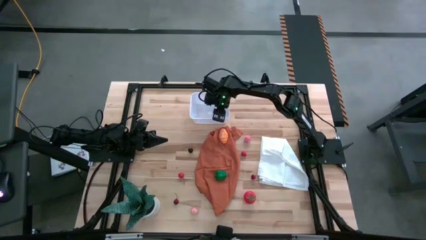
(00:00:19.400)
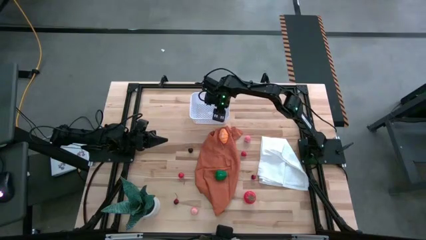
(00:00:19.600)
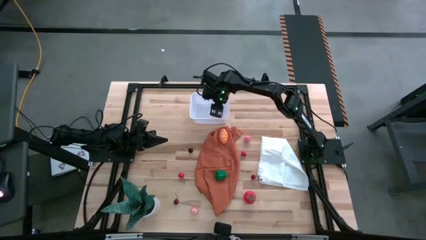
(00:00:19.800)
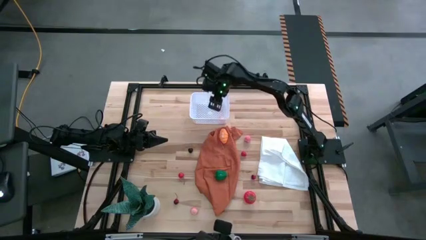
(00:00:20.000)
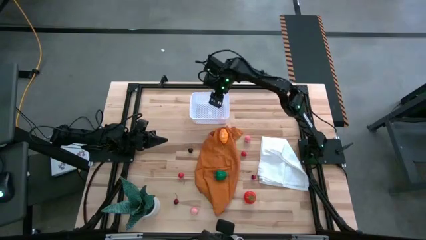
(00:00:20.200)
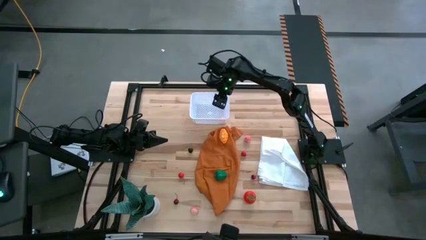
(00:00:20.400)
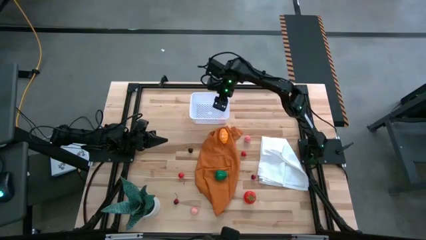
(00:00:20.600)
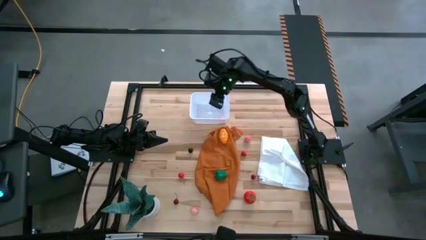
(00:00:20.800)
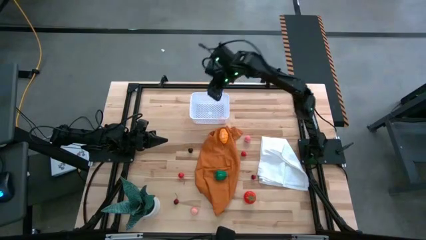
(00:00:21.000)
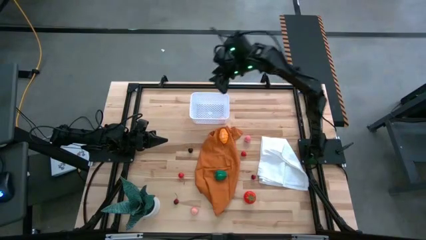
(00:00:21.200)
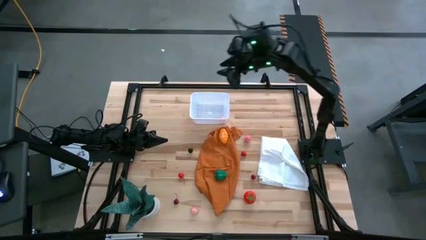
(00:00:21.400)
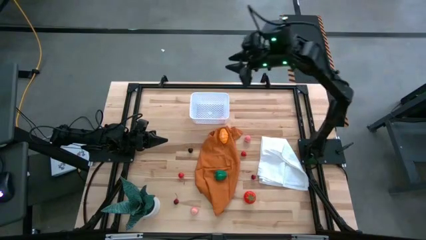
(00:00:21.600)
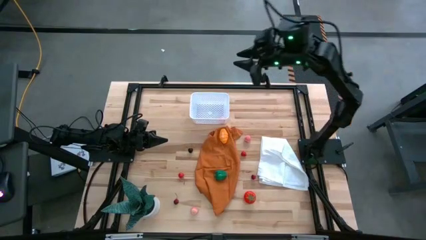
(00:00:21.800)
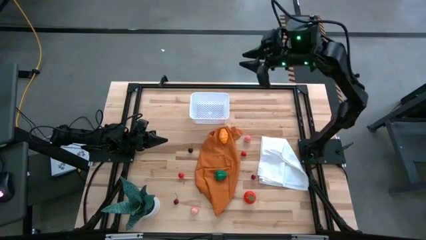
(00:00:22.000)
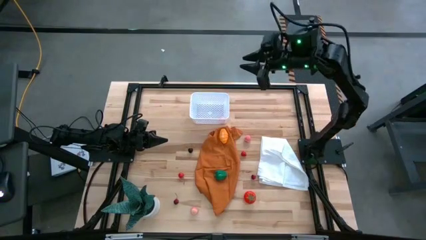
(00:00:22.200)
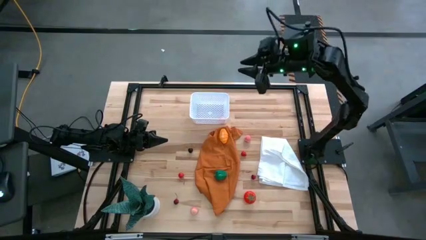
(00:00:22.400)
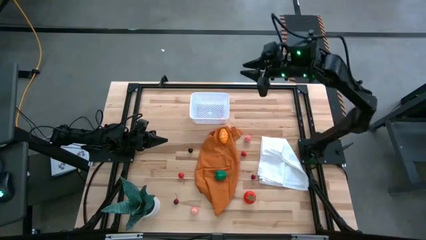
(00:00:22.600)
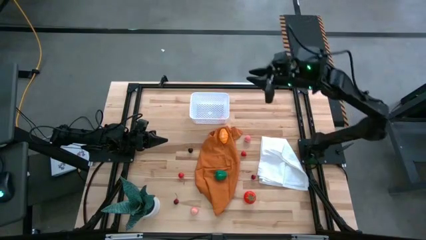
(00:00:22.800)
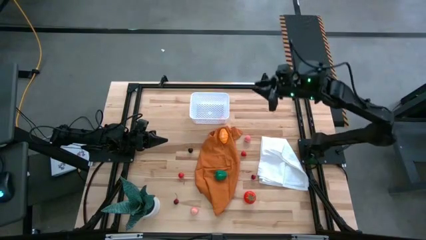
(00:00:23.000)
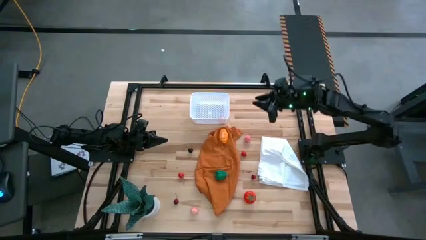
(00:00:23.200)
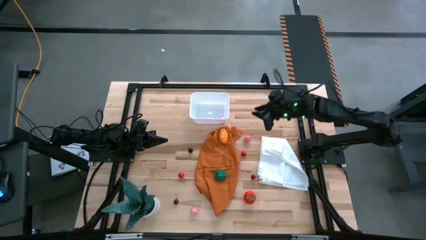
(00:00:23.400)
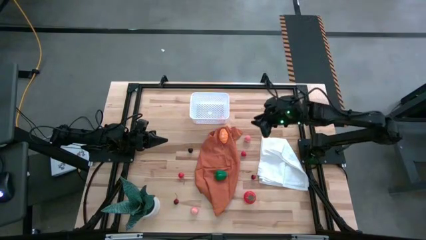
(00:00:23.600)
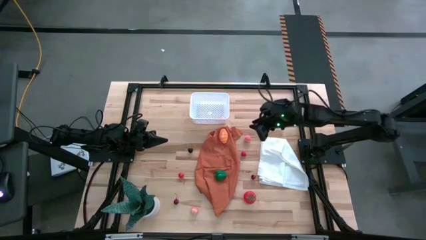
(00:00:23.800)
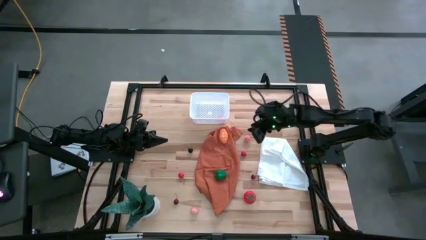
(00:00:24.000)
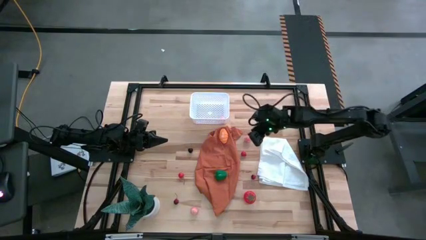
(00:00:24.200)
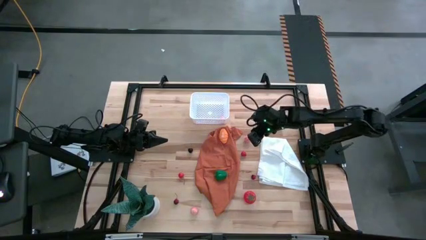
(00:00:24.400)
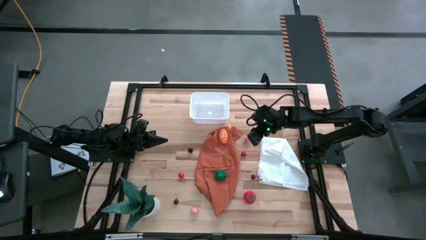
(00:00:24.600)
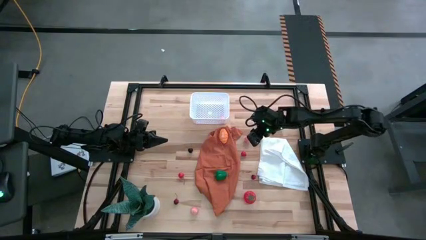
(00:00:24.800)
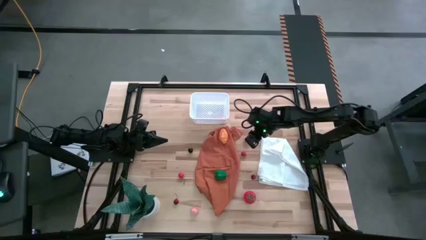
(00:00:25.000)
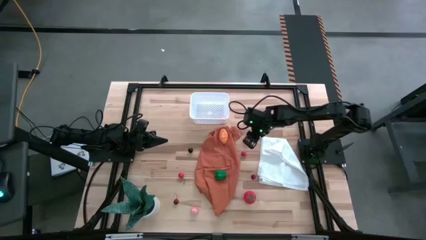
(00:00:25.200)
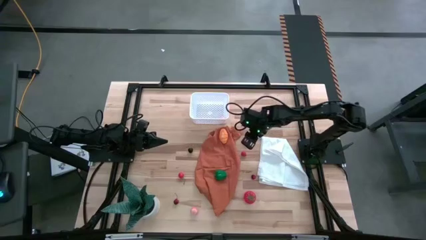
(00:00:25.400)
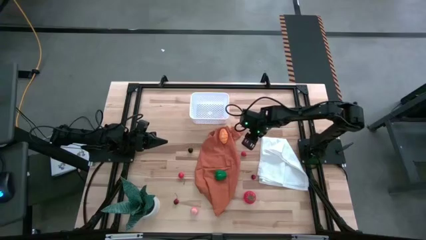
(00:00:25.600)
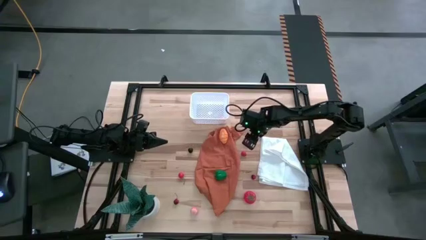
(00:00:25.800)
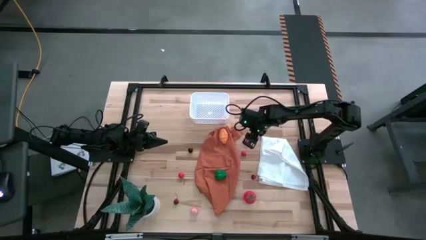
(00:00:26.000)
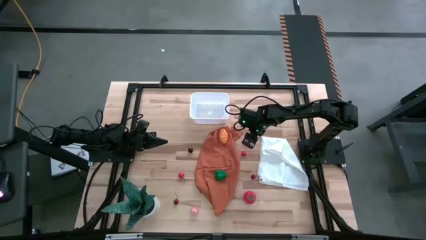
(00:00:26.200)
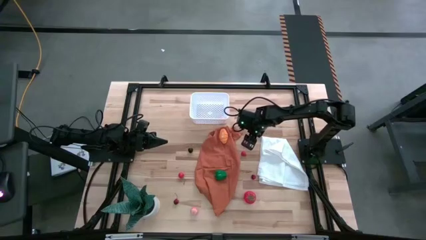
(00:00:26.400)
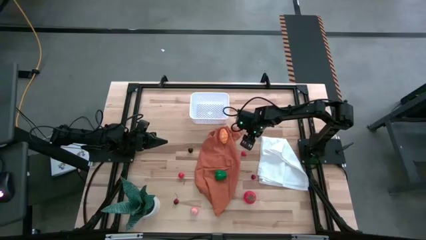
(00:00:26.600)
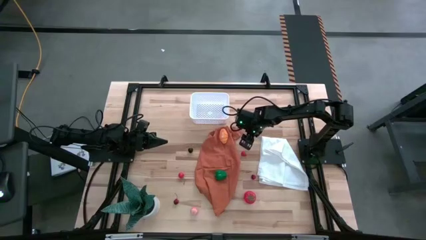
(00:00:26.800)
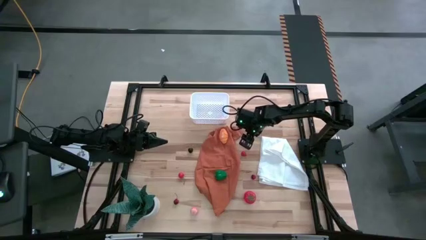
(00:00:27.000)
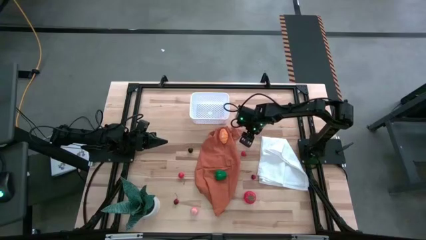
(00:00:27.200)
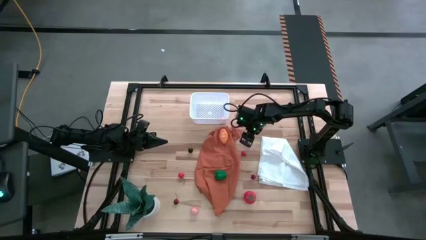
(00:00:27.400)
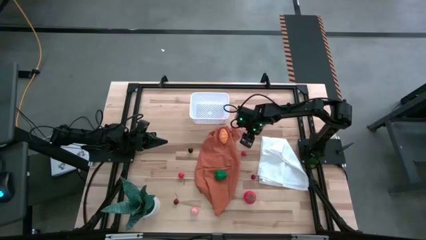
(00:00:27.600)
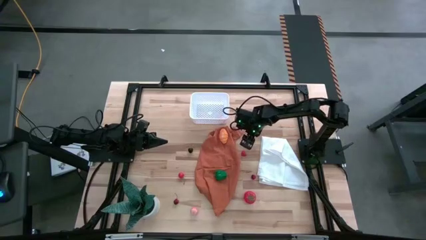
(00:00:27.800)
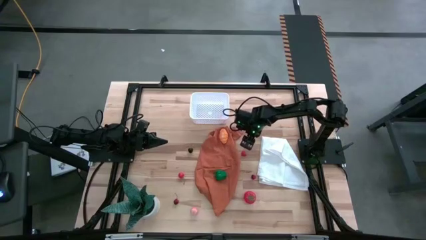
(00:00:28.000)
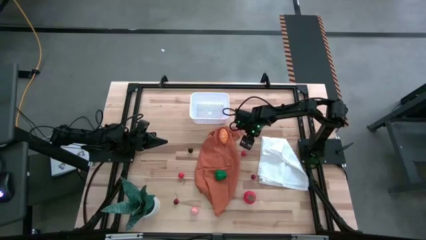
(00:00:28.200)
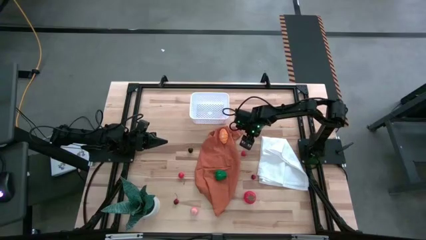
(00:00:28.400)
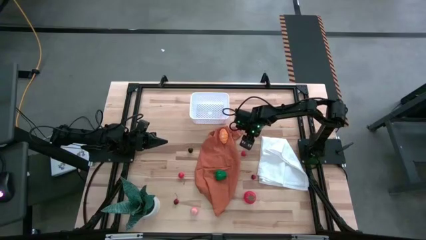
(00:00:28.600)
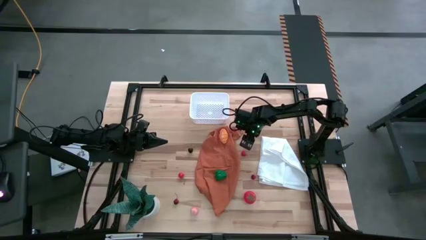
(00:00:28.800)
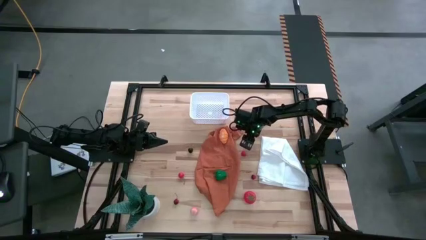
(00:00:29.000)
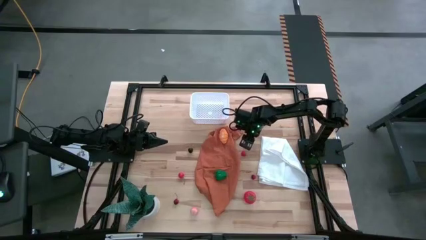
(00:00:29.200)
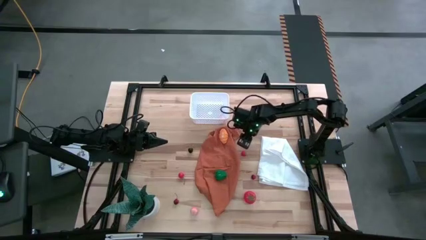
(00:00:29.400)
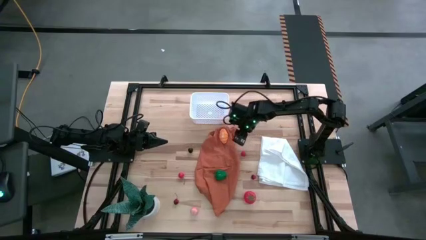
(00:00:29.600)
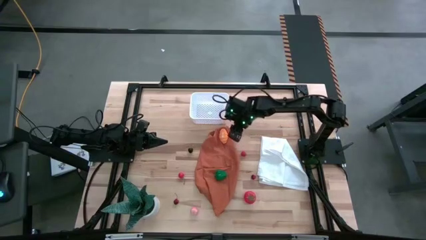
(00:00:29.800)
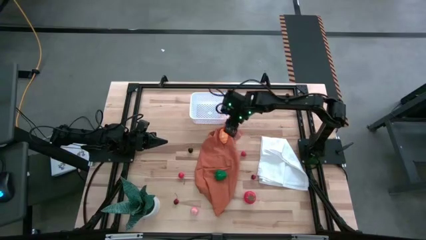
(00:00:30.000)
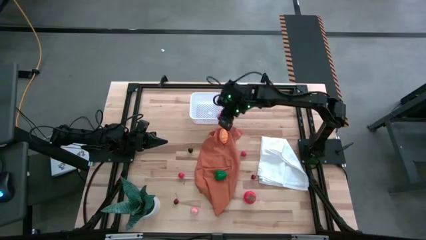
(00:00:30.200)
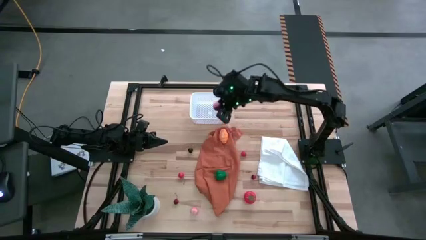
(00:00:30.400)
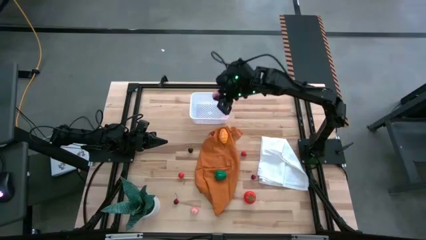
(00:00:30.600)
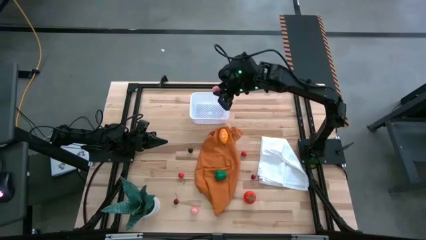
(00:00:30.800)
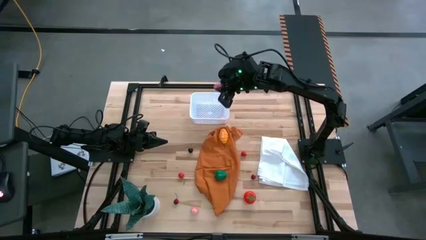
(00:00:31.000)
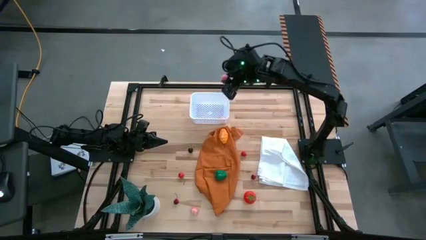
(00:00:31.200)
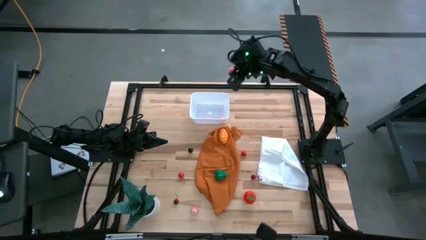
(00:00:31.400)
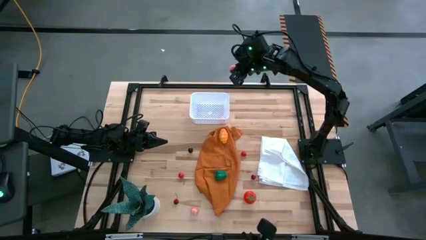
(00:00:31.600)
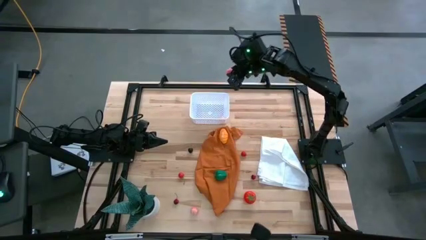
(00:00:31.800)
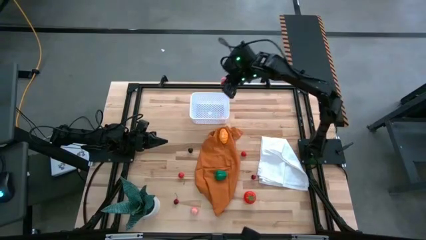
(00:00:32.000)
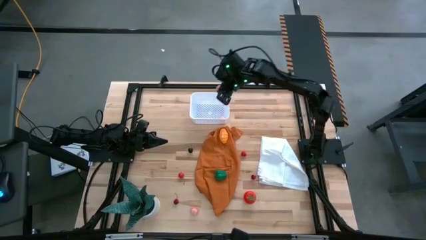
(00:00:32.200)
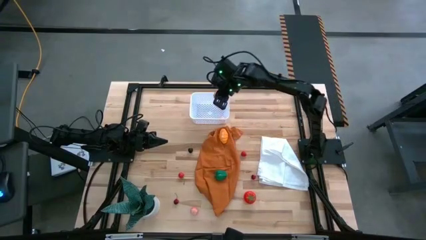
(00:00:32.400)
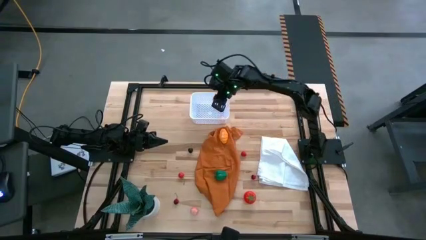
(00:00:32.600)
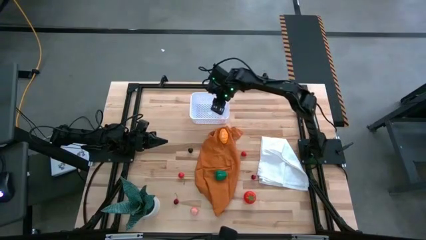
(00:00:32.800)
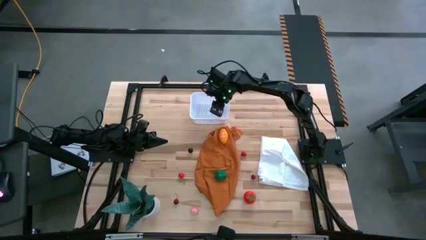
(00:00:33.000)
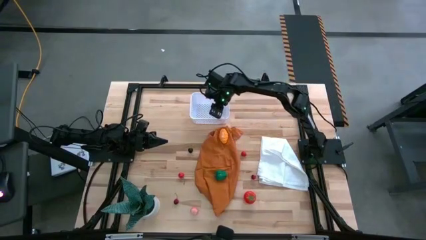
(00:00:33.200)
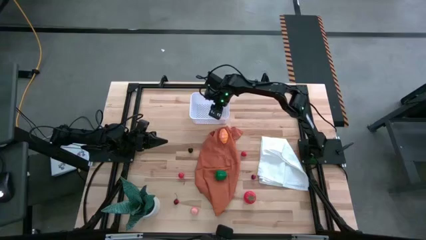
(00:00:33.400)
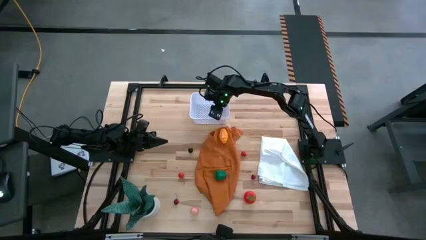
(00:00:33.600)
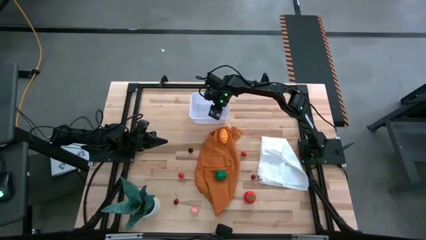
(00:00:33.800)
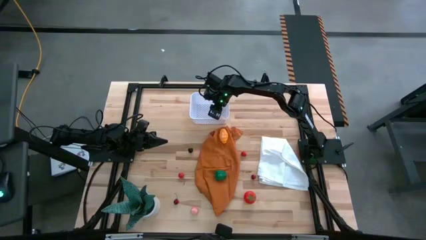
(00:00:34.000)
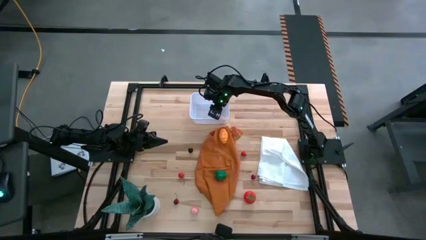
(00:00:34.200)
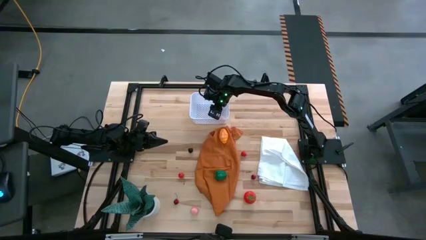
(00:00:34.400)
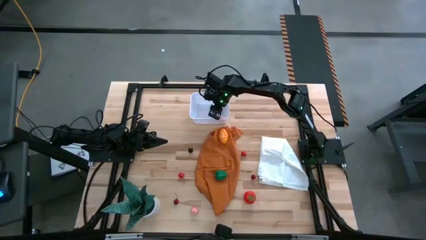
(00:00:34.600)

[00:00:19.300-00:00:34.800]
Task: Pick and placing Produce into tupperware
Put the top pink peach into the white basket
